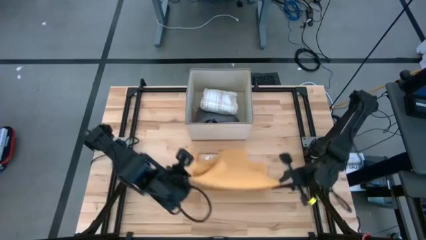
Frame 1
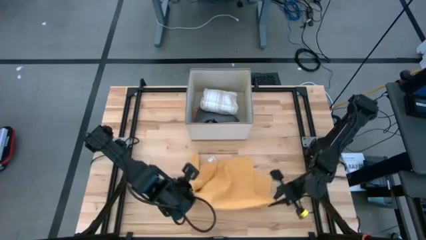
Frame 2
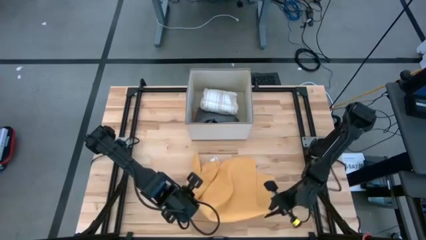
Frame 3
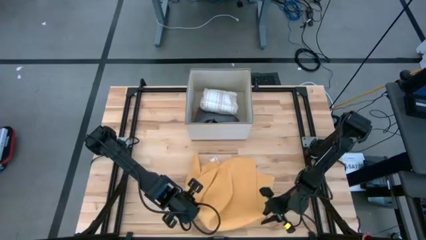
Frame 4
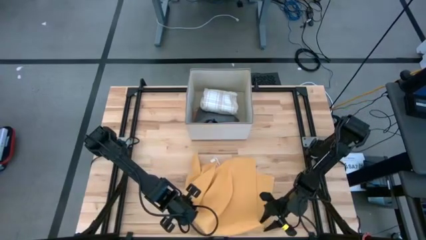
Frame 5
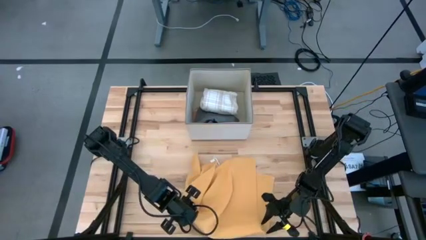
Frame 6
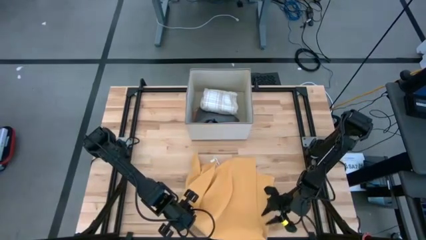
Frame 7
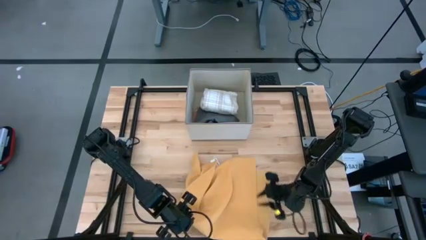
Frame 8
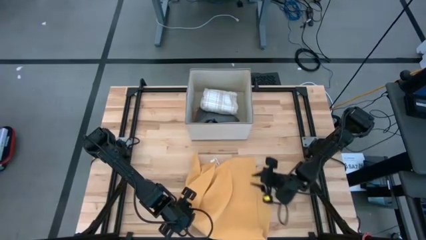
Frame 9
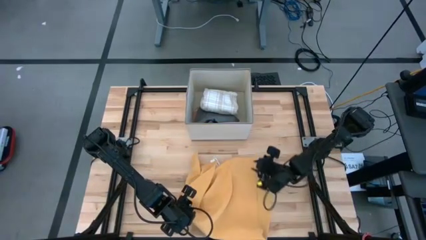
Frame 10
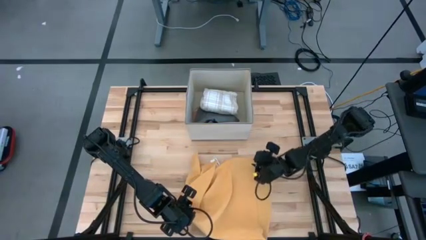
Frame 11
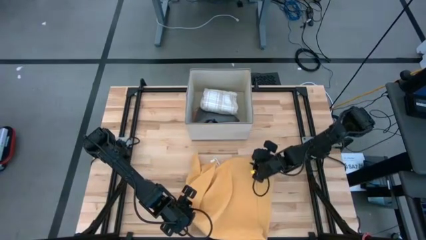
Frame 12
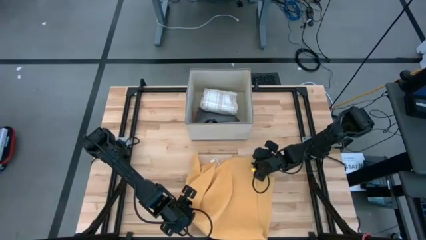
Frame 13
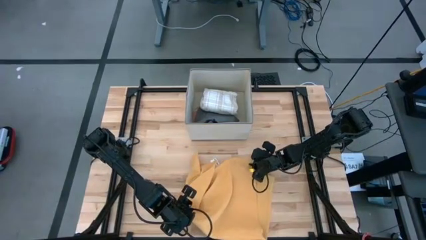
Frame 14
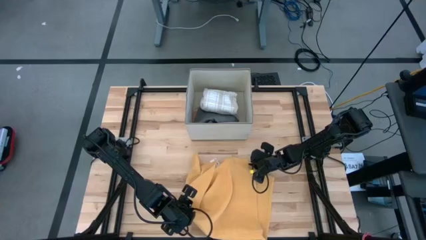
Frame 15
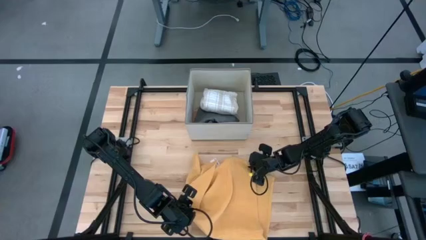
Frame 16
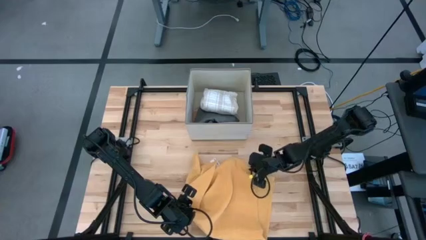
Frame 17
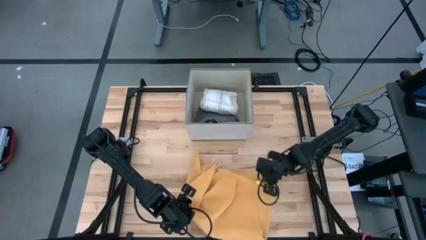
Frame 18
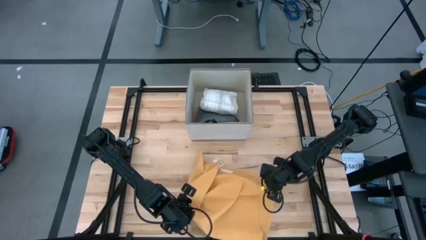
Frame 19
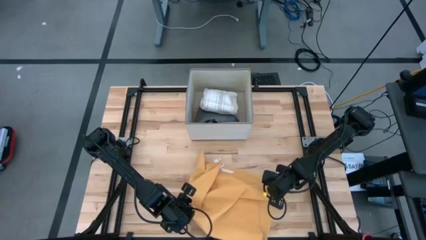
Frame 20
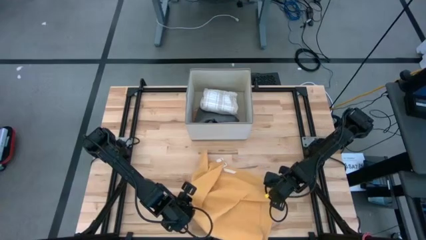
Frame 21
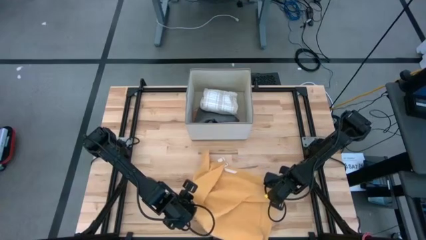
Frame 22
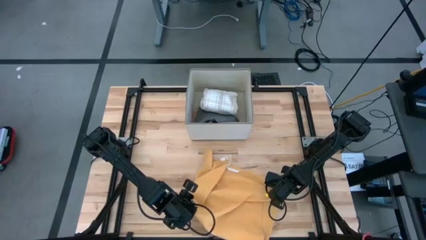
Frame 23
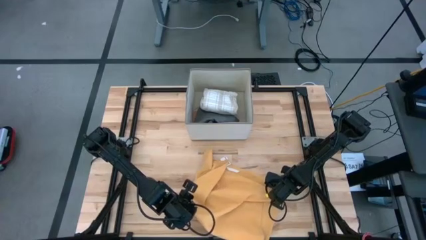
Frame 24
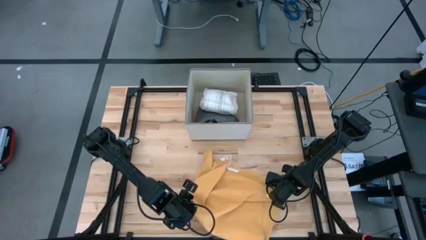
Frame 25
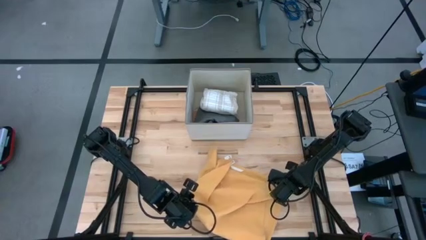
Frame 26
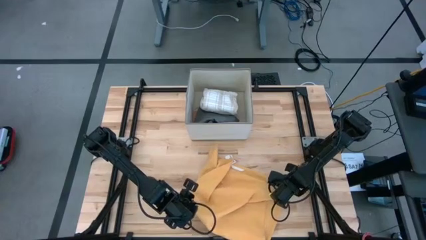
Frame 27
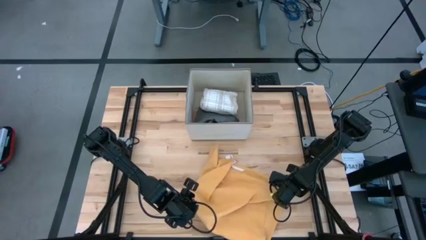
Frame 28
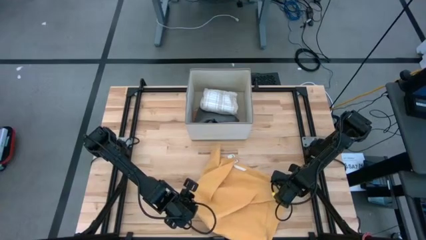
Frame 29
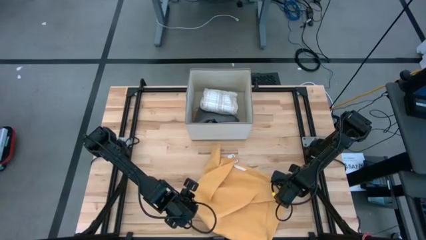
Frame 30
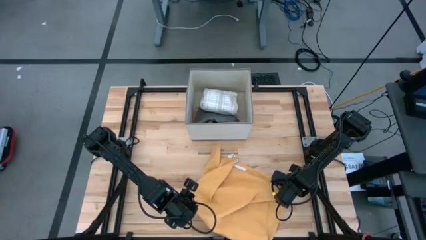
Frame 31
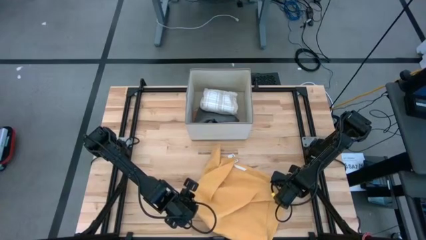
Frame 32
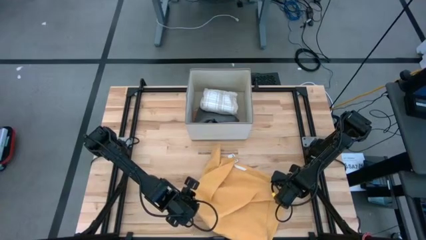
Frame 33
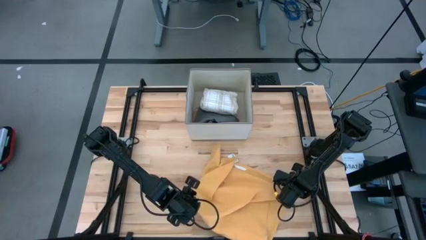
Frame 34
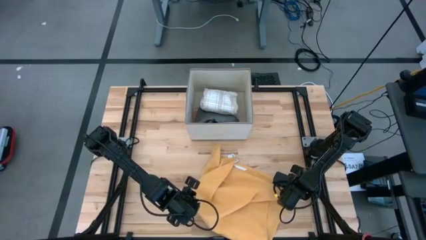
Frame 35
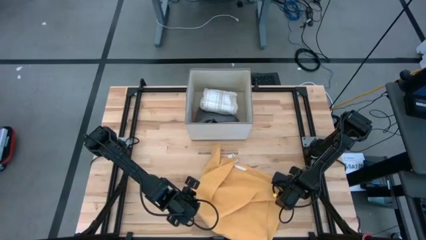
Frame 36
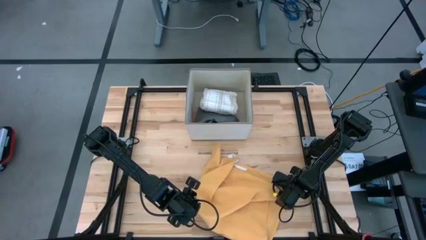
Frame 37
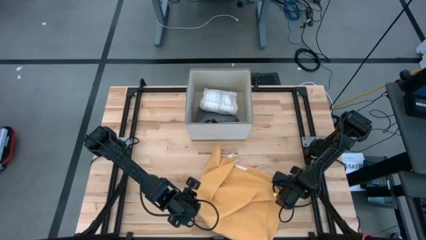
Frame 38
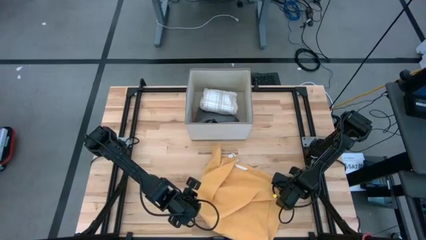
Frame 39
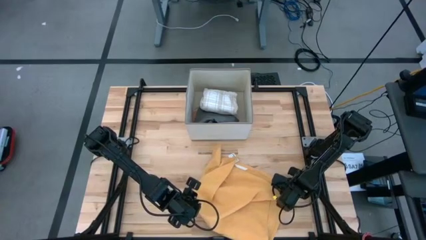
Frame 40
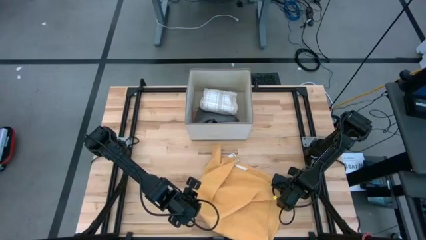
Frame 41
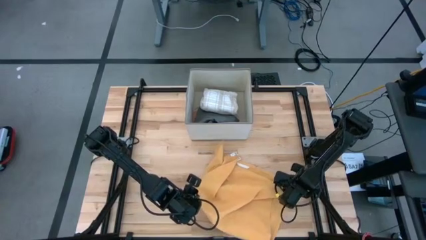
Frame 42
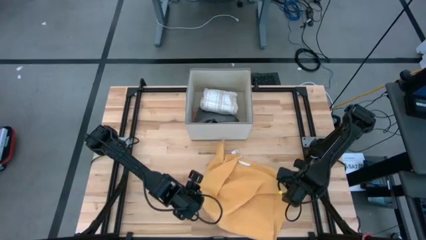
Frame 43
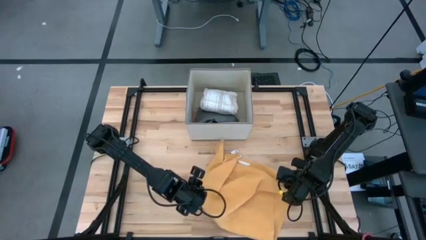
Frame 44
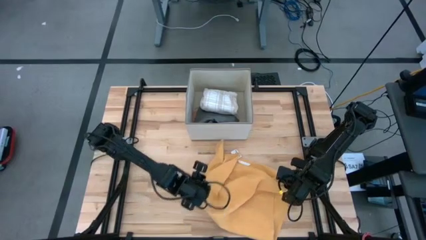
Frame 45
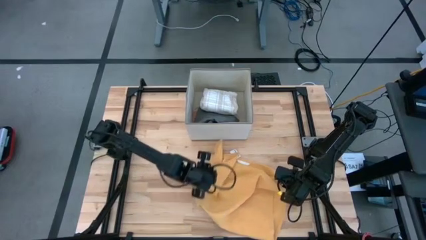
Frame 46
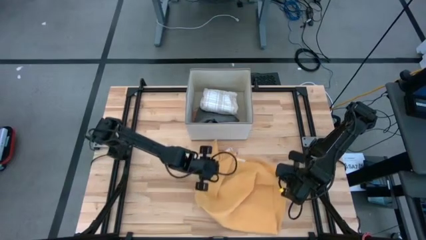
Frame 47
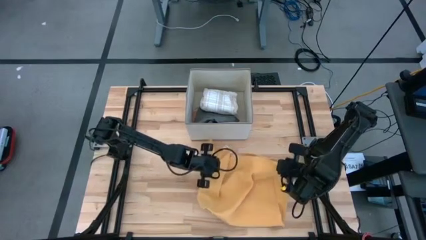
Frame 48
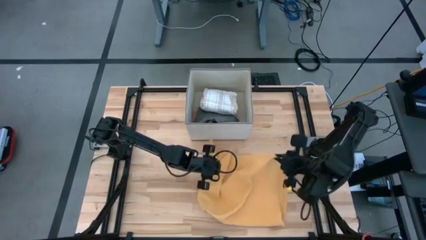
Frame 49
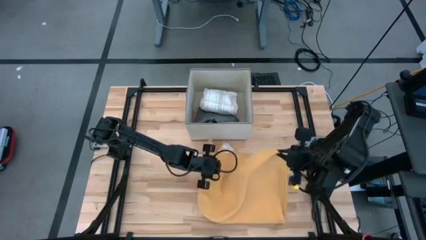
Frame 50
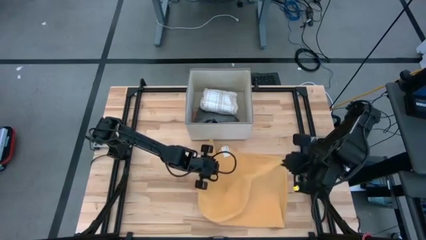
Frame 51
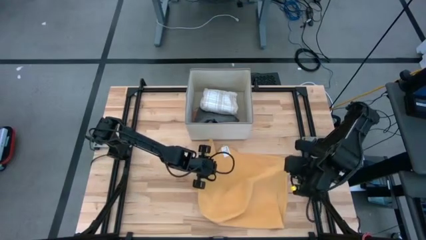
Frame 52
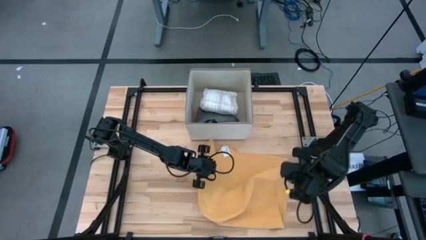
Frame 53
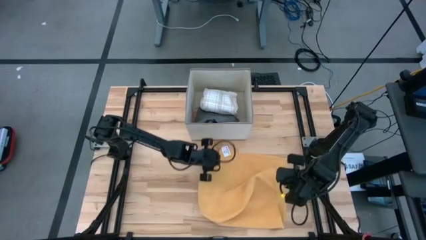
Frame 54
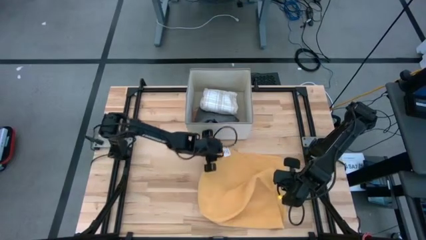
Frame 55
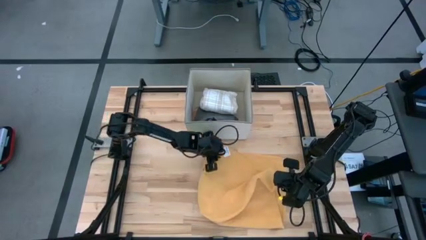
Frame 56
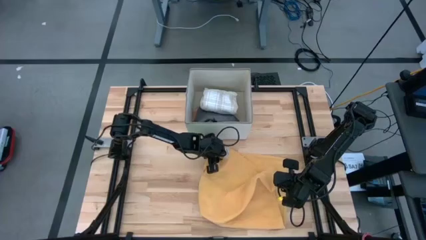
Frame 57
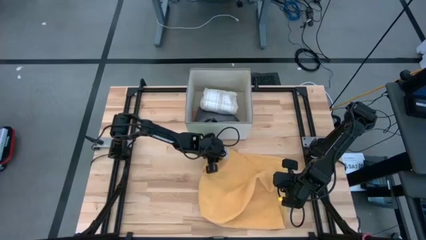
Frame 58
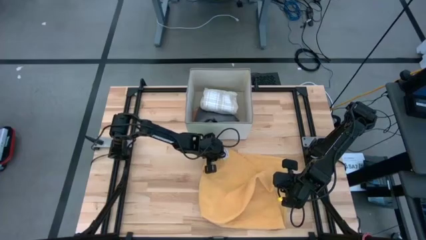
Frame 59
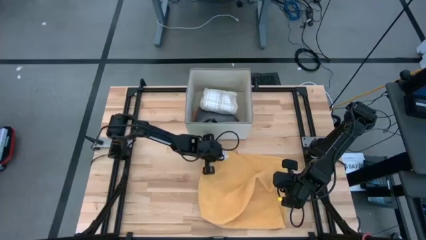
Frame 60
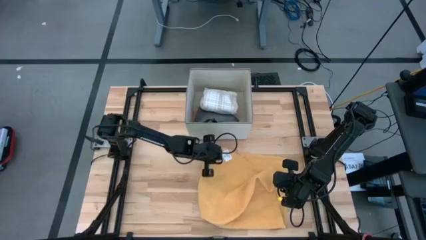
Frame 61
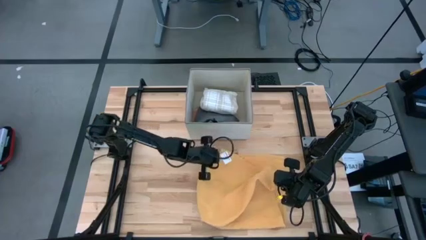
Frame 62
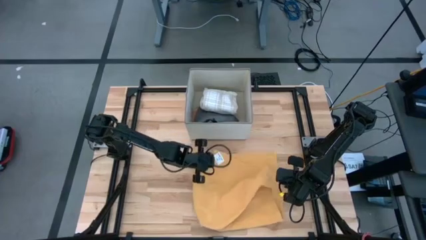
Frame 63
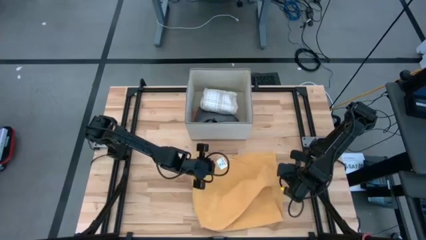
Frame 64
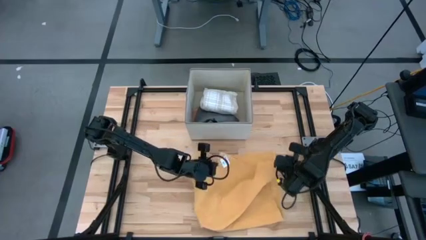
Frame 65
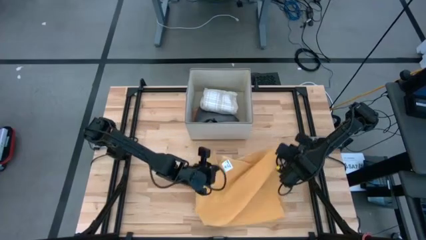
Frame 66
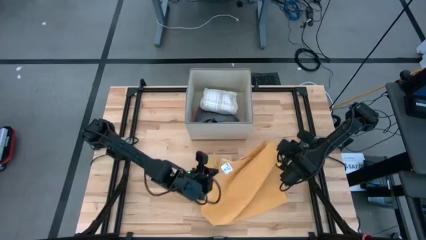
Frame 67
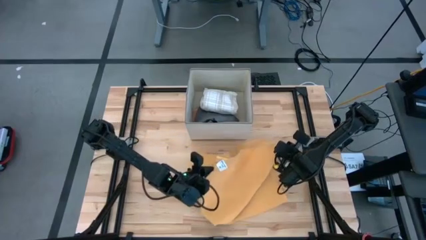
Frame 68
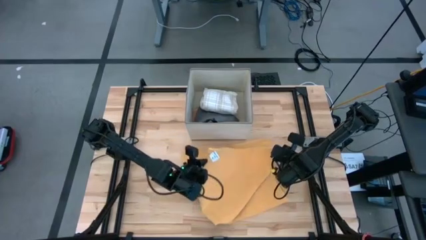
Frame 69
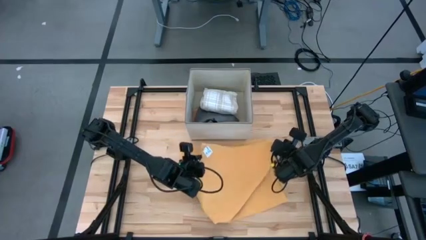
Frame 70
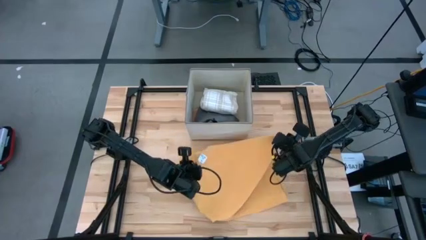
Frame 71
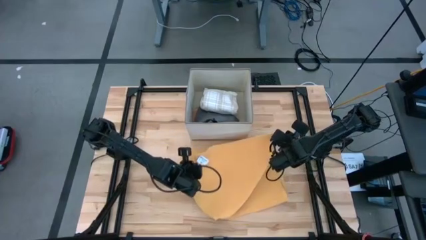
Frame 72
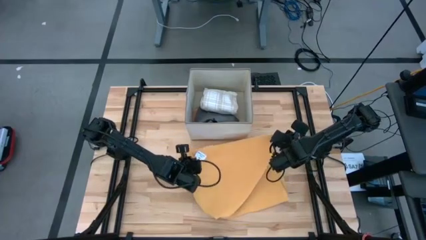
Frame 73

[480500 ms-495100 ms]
Task: Fold towel
Fold the orange towel
